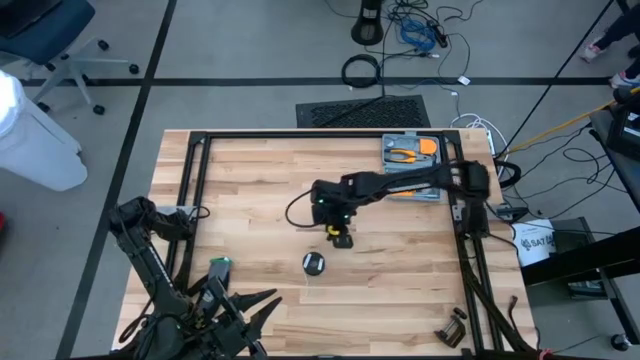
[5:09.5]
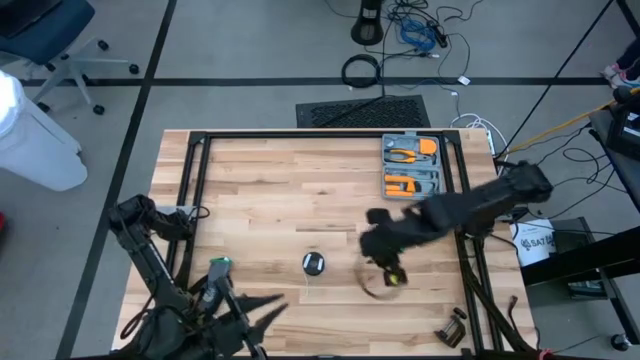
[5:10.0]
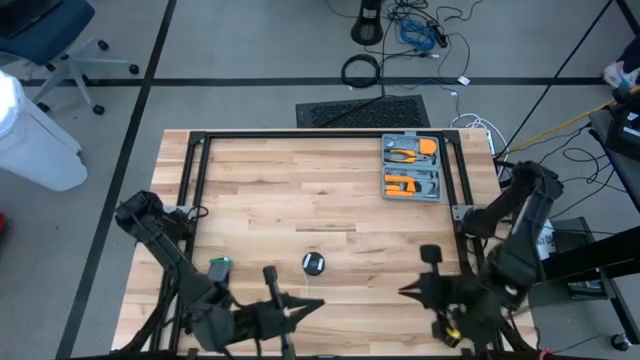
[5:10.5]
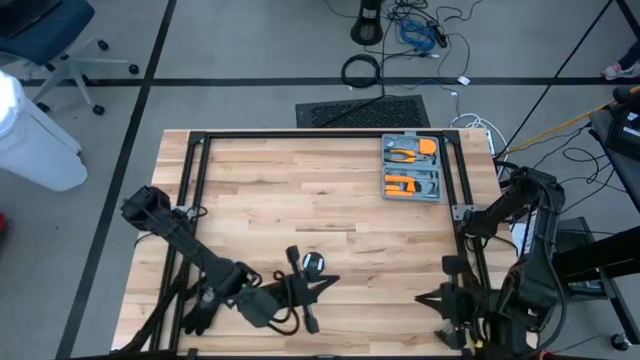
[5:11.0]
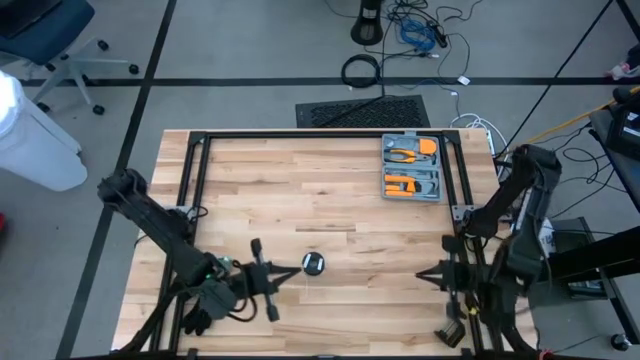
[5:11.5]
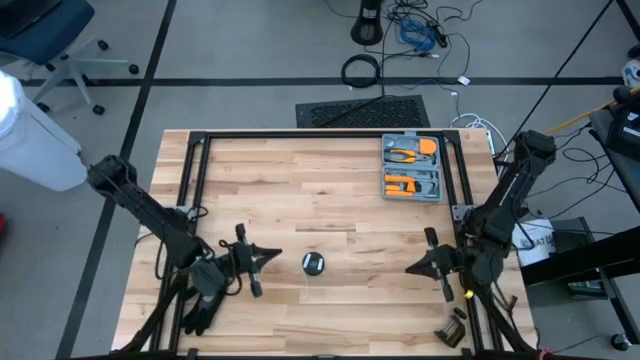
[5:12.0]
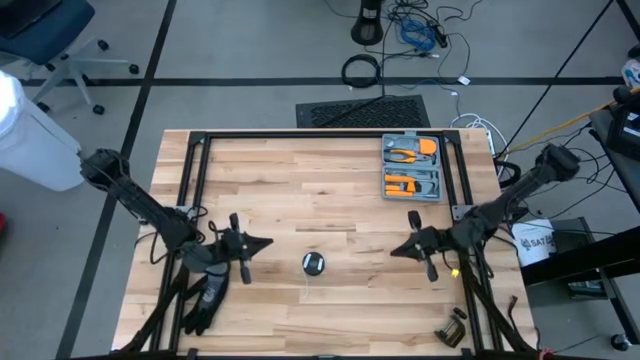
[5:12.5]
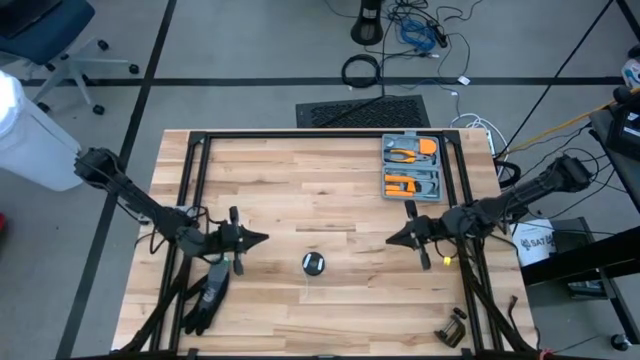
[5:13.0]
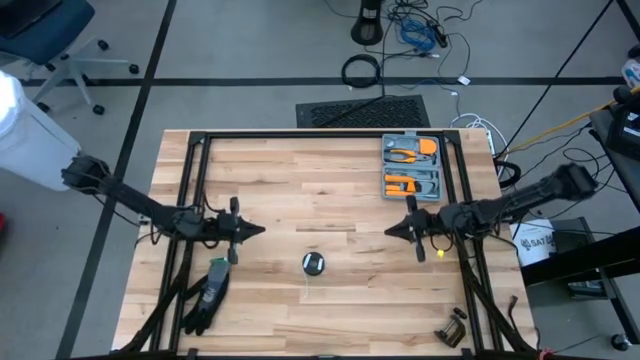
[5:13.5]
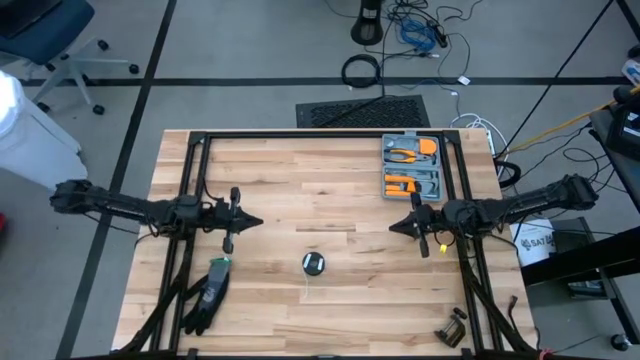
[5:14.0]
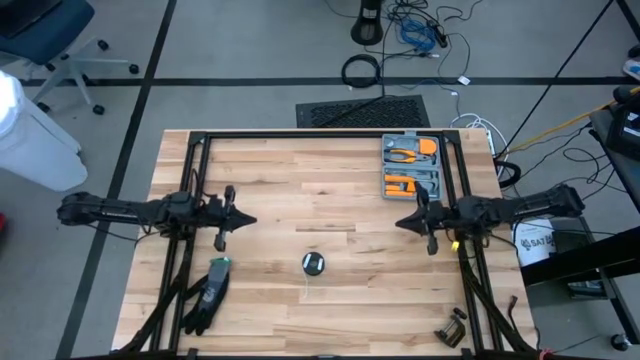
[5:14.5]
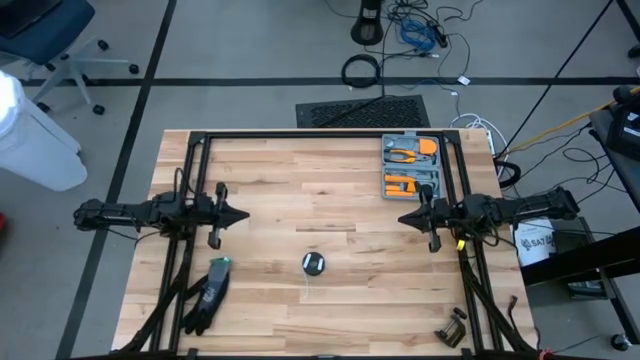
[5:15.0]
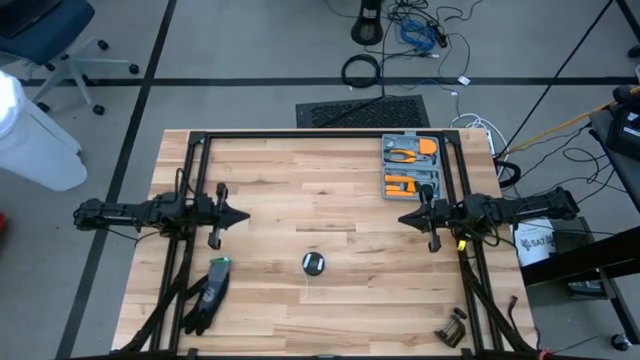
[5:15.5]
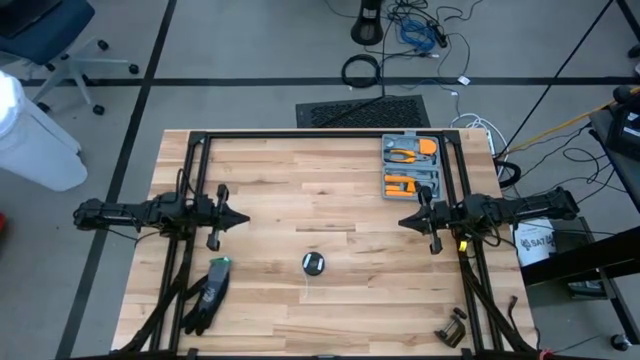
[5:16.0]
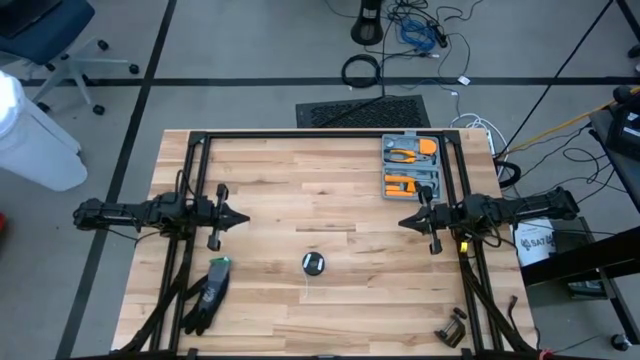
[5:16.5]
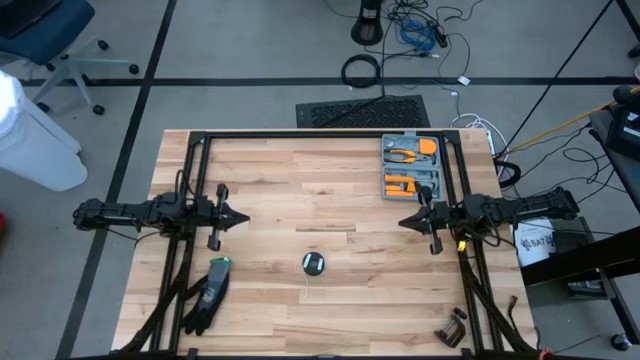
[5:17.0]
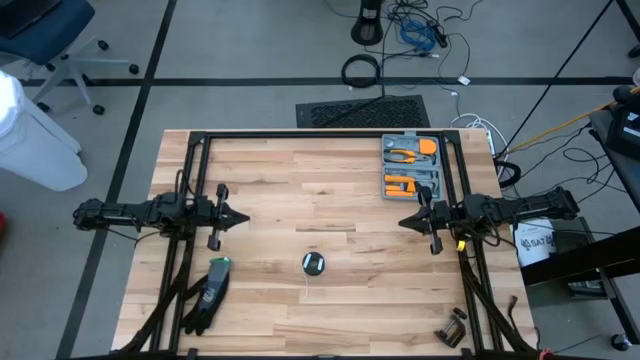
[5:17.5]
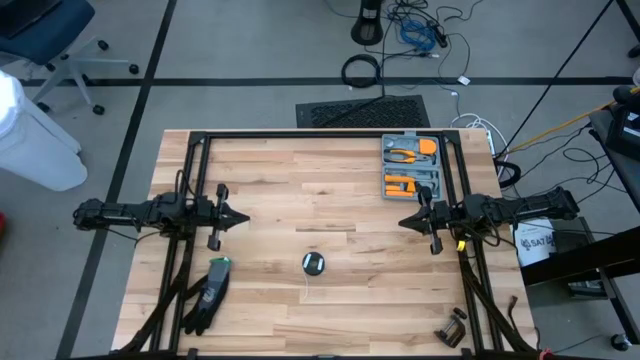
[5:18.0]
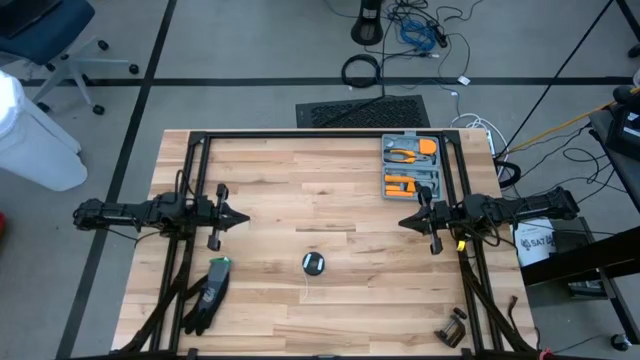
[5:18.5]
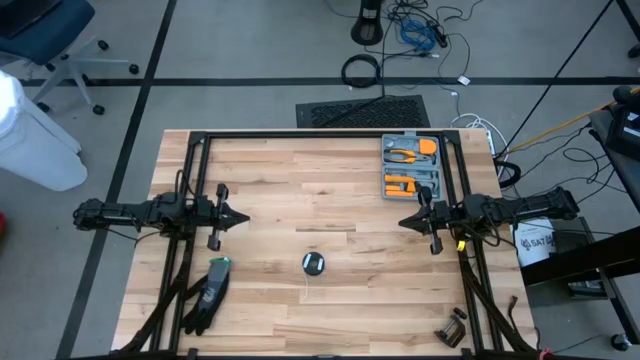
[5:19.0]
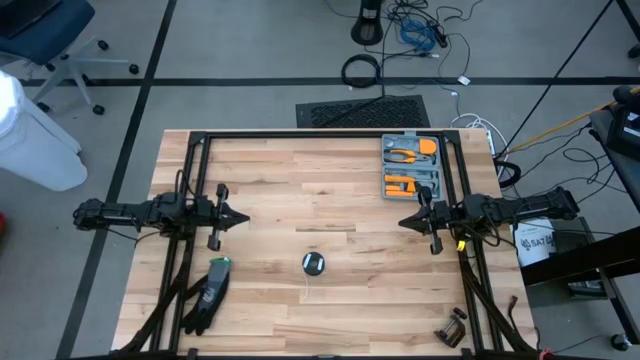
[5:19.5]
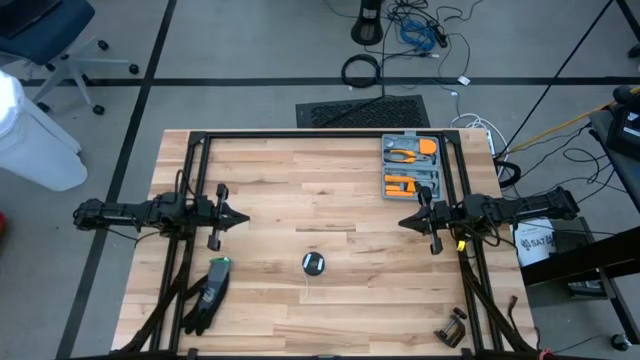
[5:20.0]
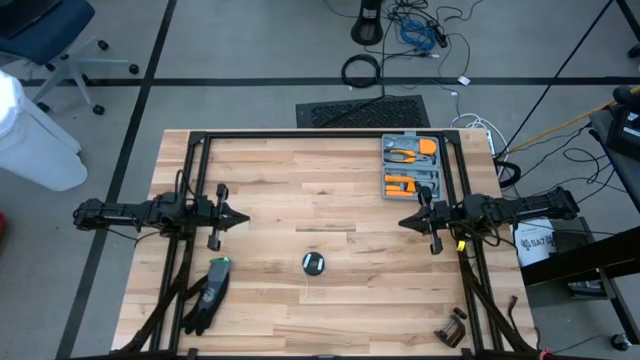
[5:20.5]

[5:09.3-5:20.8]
Task: Coil cords
Return to Home Position

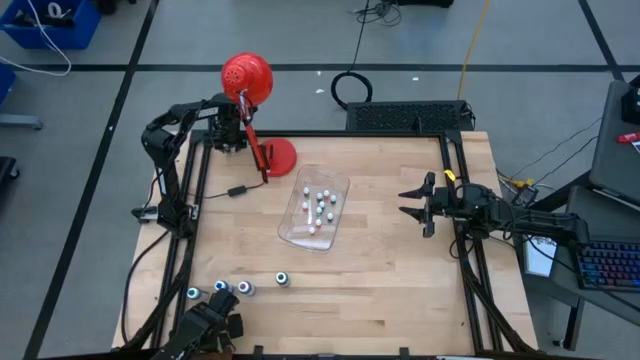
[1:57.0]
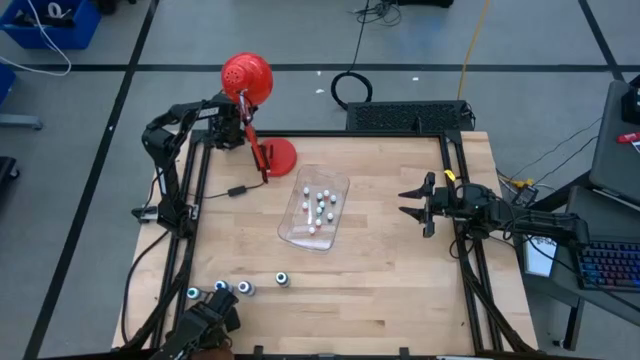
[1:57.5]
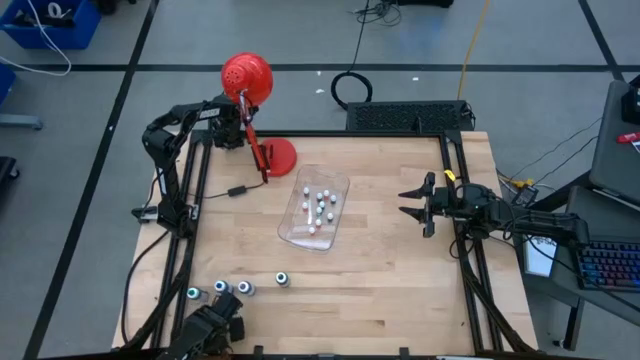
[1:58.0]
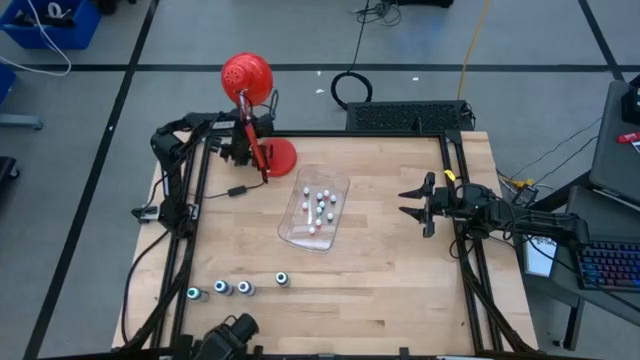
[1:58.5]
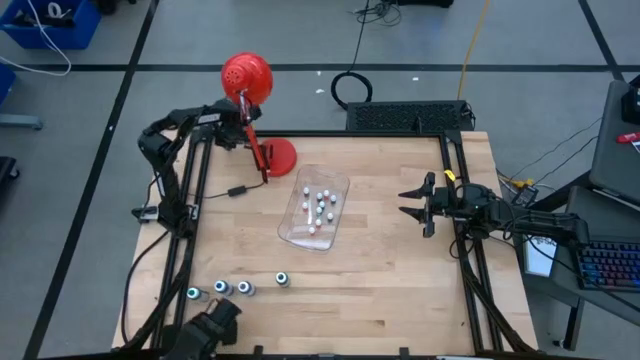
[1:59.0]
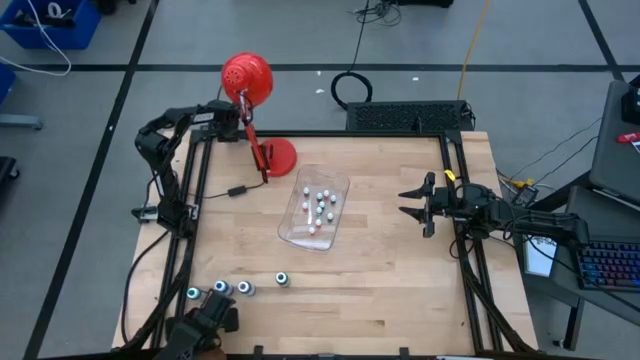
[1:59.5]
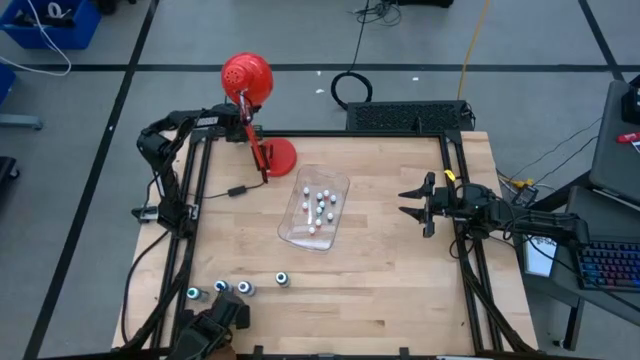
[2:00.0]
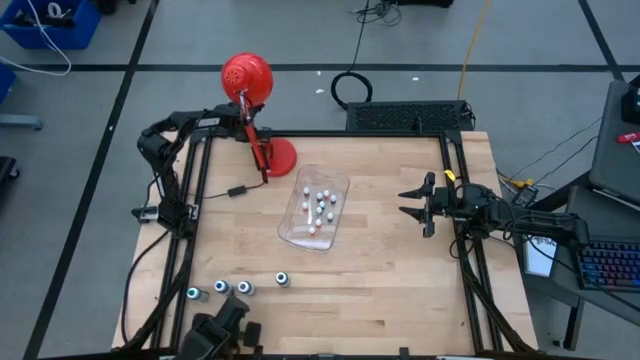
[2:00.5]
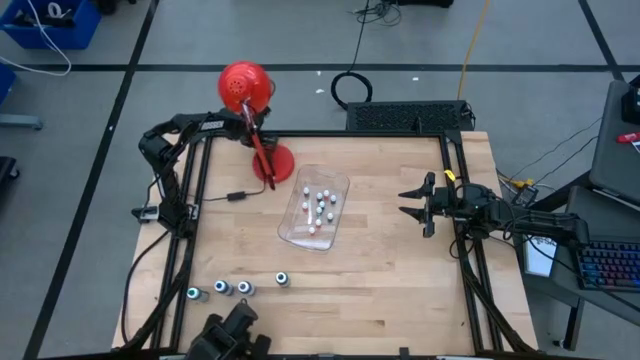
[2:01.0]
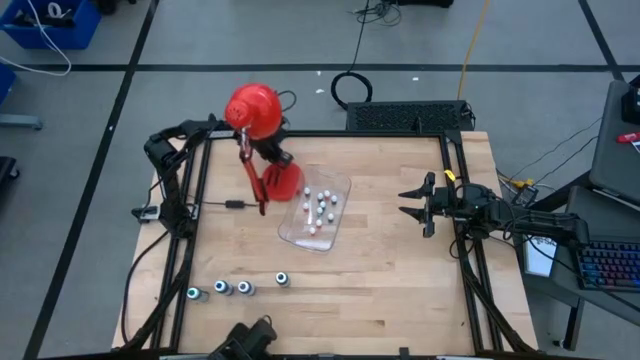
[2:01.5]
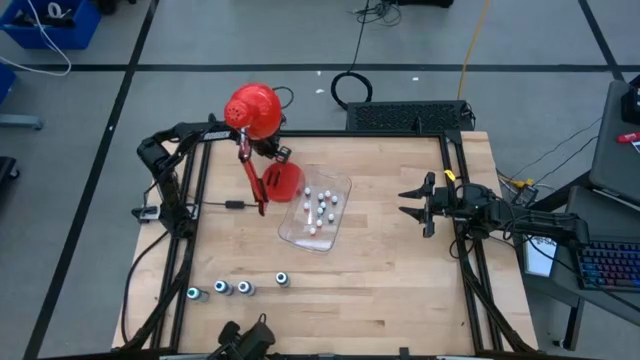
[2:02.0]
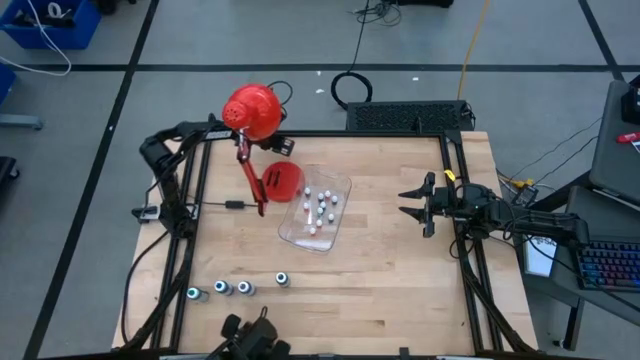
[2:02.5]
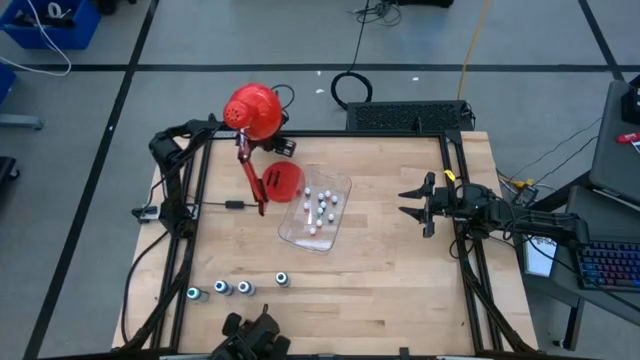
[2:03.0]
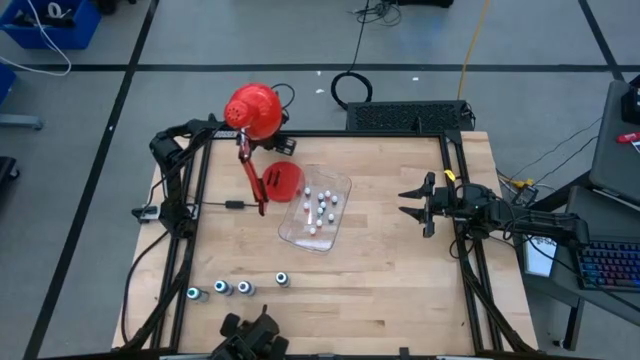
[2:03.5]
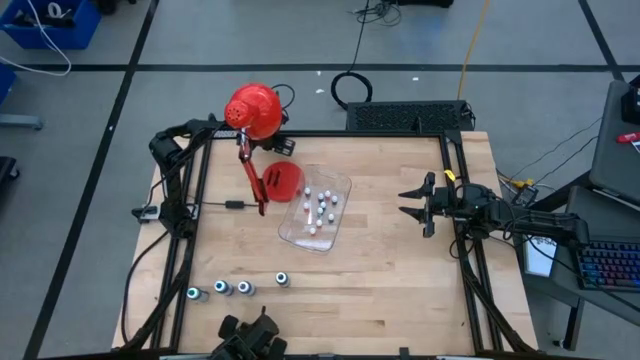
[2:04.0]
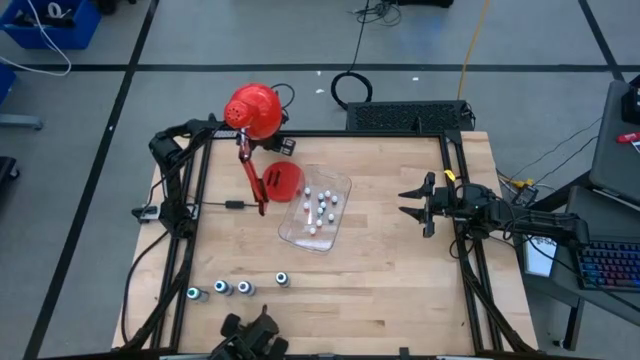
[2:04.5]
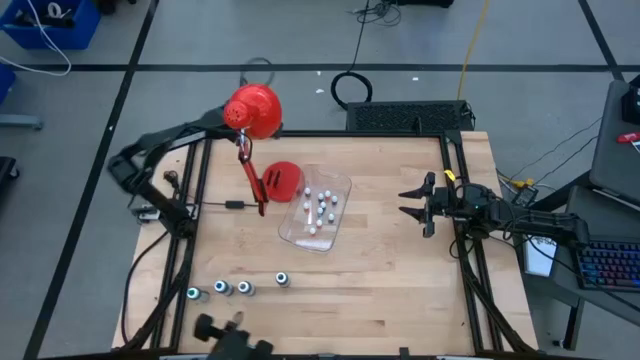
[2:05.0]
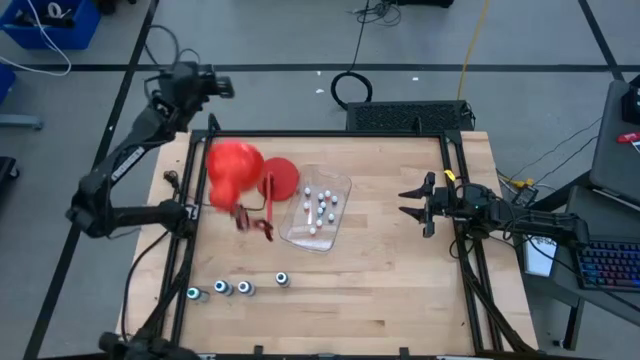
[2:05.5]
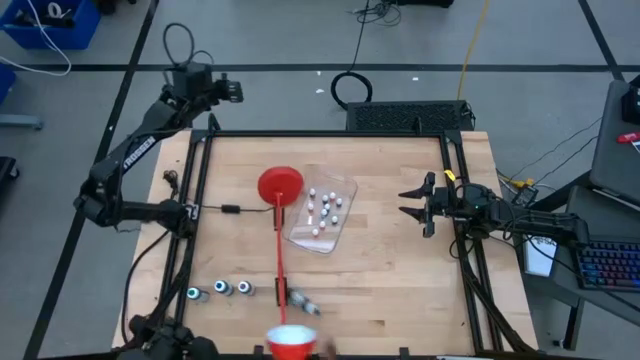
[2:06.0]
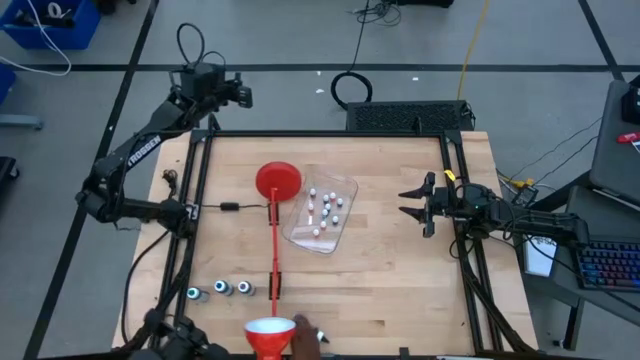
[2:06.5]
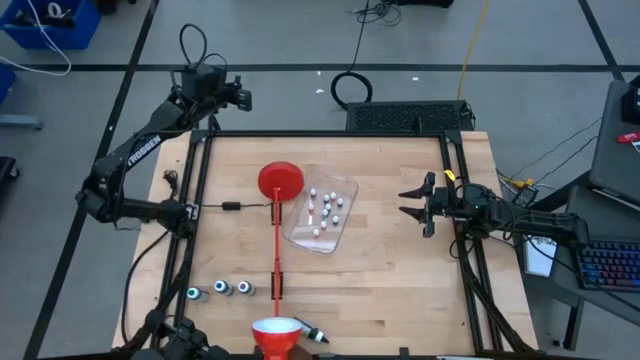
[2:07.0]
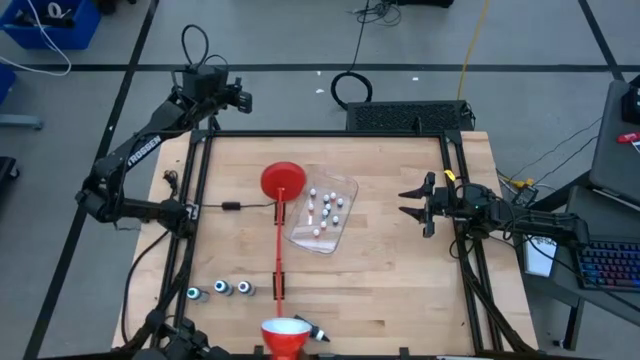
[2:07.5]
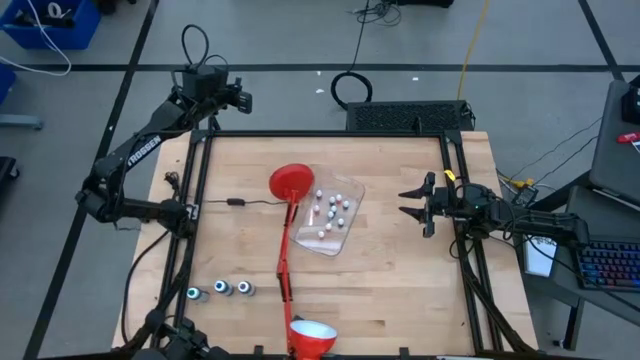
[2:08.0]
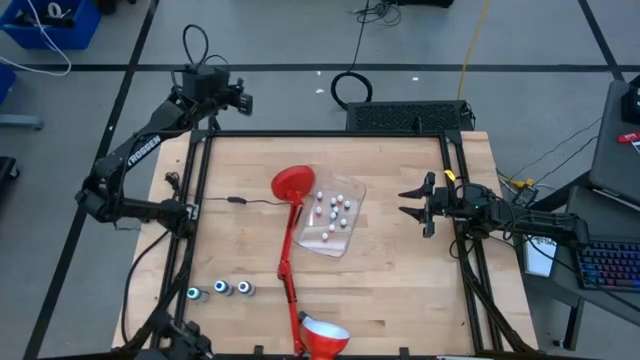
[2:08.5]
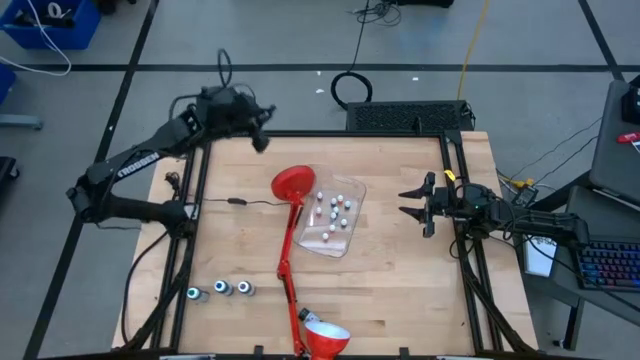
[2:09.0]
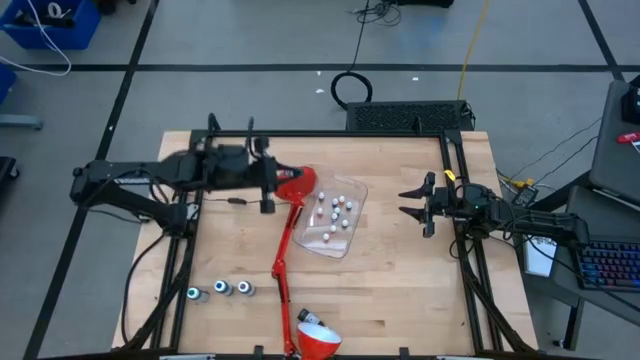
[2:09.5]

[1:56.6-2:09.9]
Task: Pick & Place food coloring
Put the small purple food coloring bottle into the transparent bin
